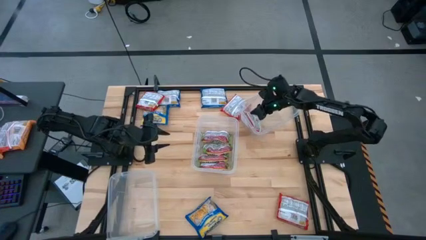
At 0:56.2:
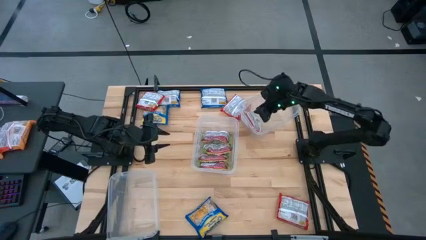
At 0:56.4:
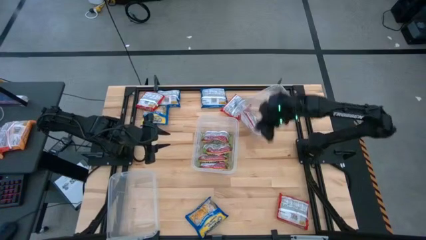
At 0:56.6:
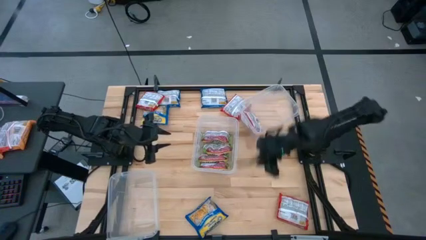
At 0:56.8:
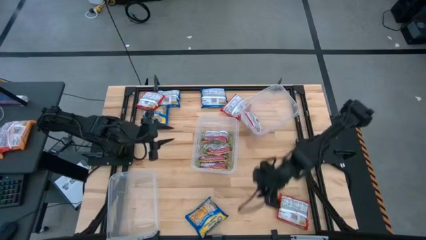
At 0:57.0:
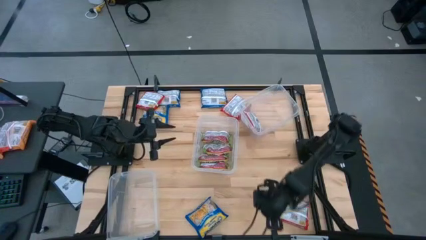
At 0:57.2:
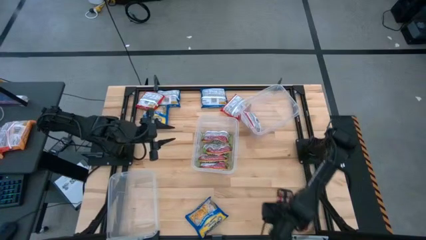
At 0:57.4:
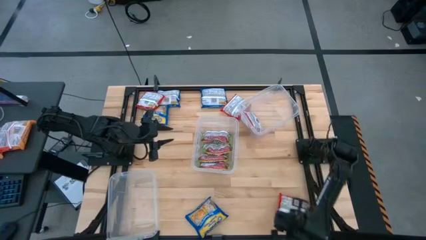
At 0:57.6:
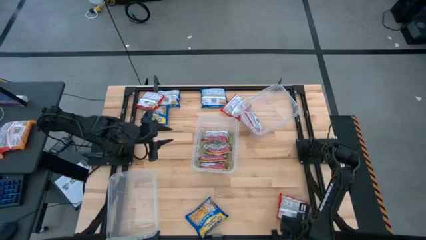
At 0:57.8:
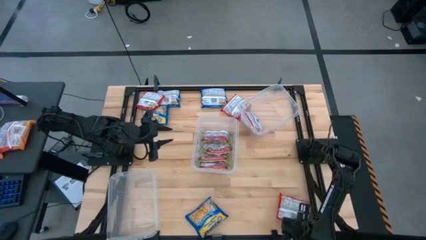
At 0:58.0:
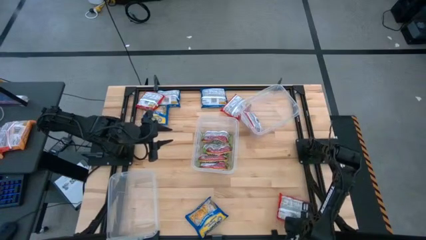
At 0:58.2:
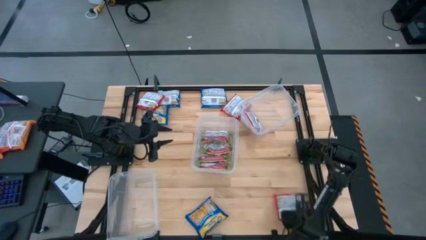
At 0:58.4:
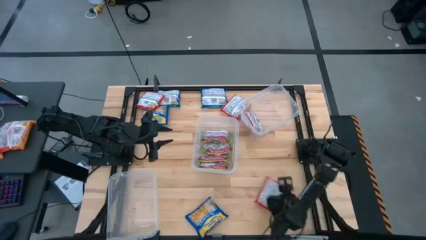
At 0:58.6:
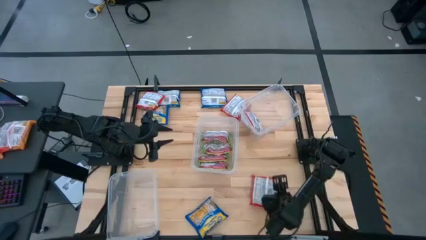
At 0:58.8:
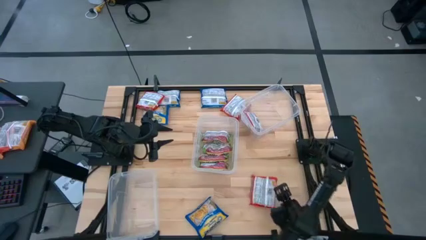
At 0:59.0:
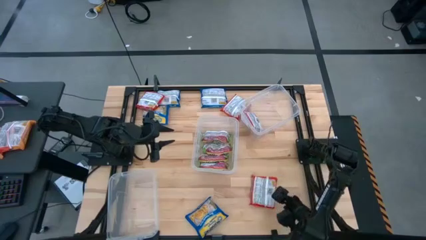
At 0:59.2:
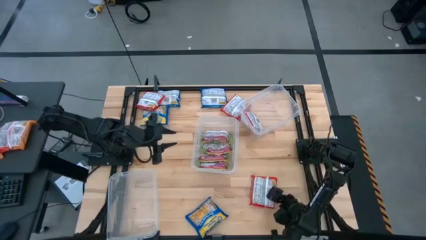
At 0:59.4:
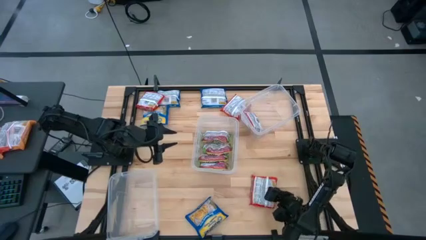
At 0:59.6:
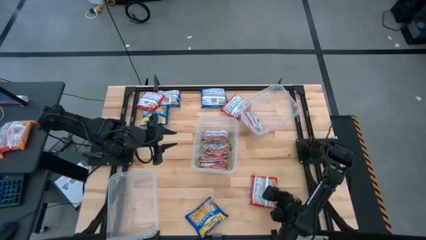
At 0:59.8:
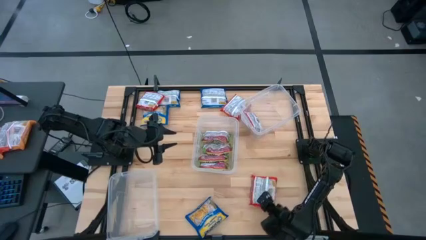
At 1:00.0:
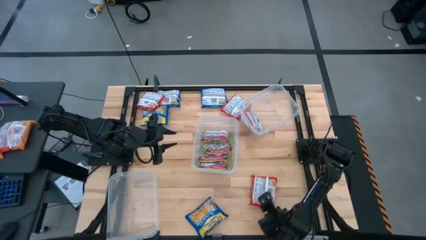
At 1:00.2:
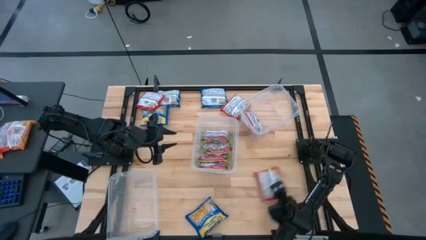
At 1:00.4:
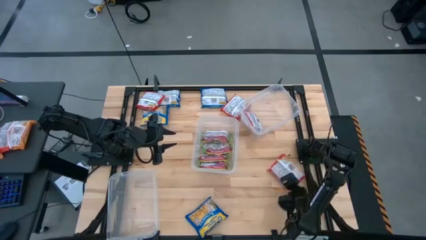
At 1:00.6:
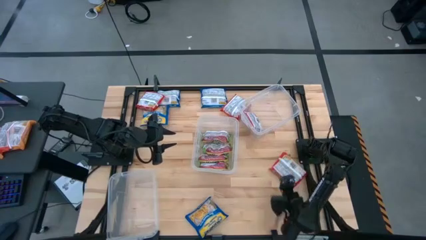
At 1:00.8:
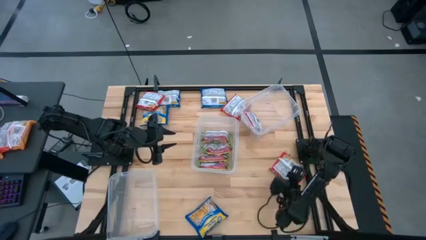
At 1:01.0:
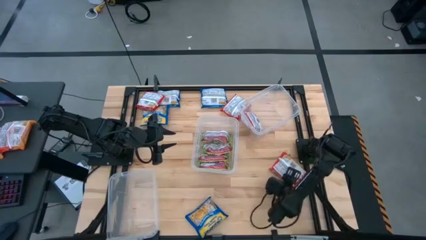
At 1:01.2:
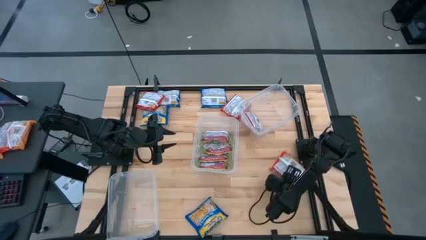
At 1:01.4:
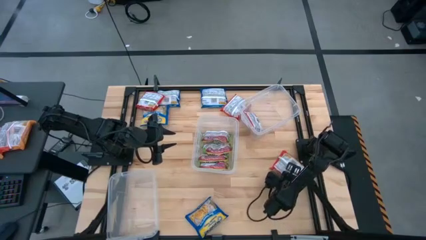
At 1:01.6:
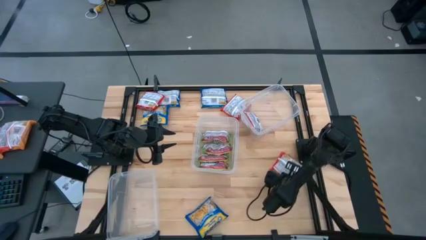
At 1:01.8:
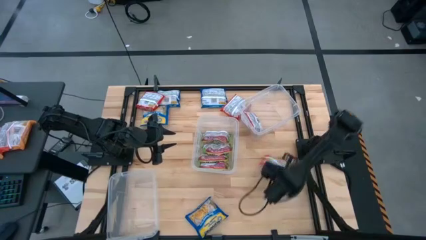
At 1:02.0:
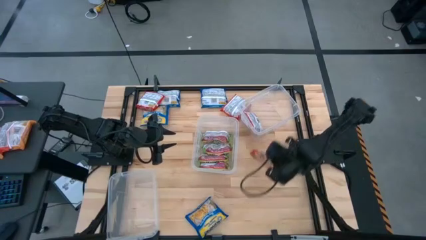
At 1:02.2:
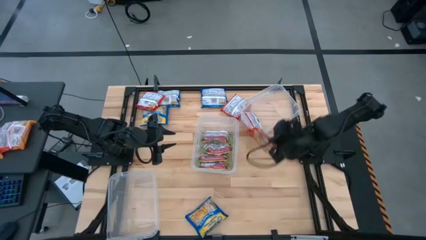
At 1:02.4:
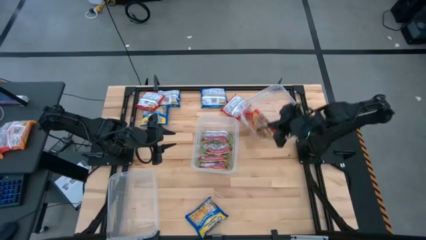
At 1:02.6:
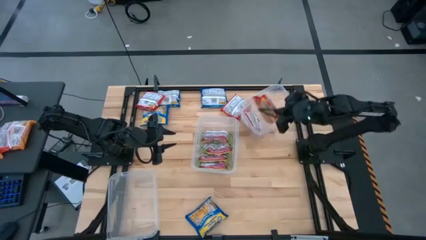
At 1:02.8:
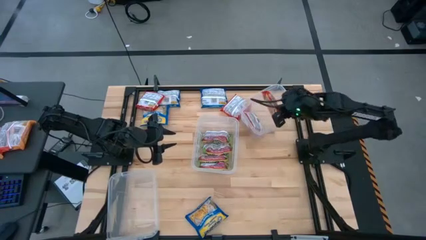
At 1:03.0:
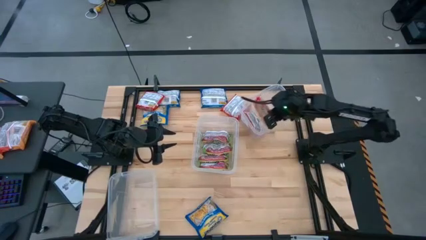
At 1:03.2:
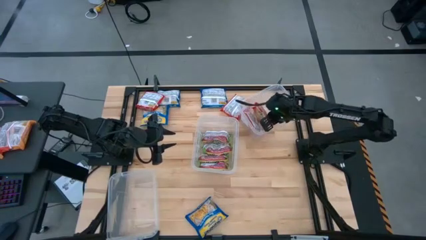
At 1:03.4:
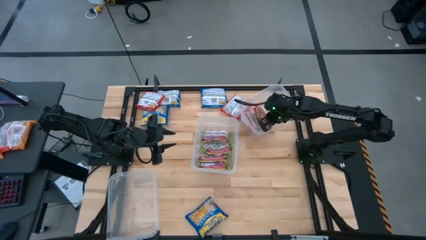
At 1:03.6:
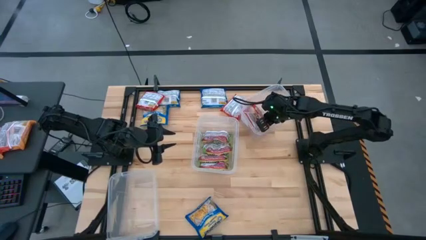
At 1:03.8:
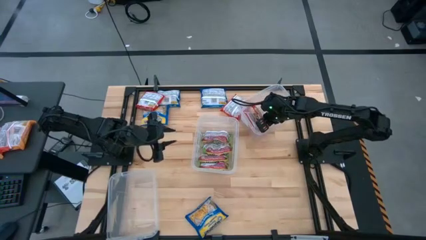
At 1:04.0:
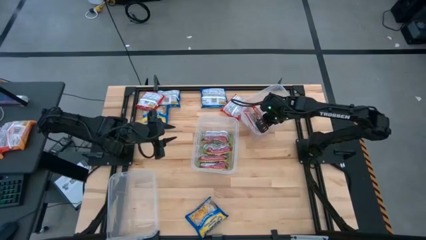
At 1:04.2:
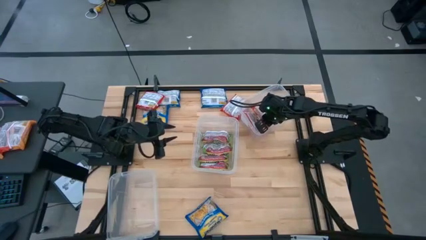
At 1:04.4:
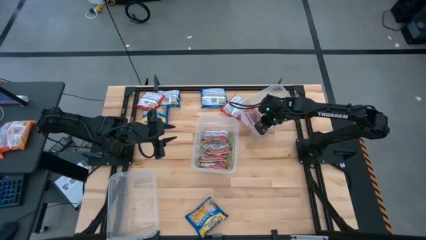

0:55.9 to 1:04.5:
Task: Sort Maruchan noodles
Put the red noodle pack into the top transparent container

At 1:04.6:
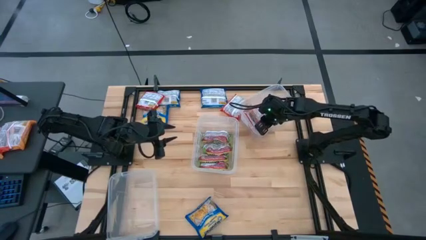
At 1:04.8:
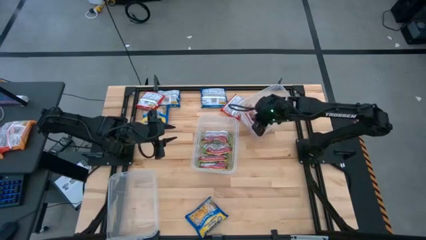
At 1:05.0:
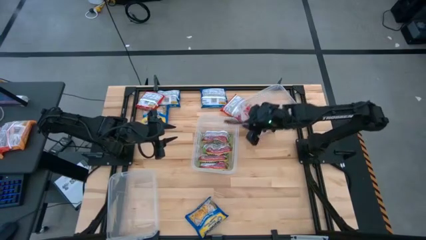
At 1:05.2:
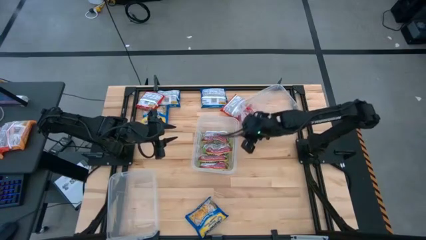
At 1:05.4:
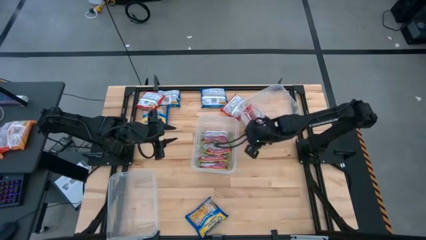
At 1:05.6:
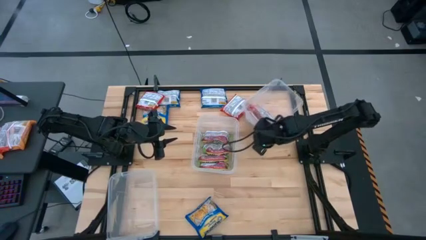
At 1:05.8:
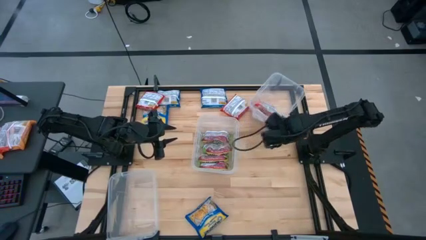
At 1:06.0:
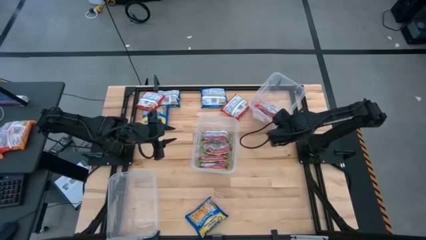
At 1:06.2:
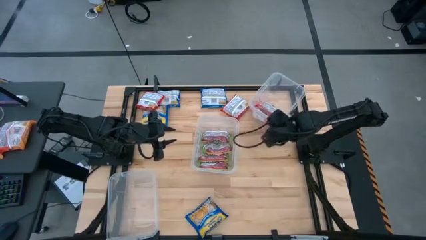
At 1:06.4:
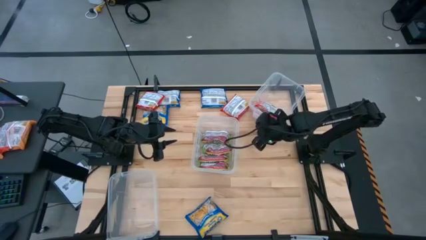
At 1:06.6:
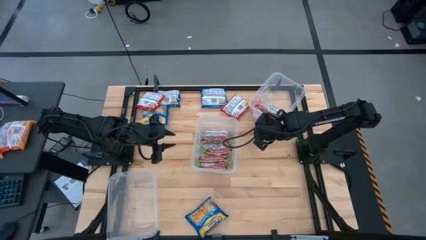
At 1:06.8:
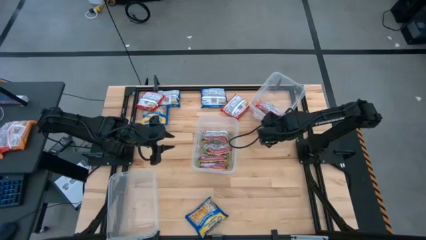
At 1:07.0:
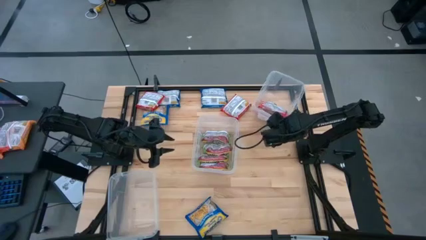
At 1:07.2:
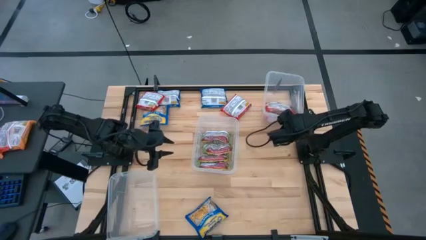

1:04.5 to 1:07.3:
Adjust the top transparent container

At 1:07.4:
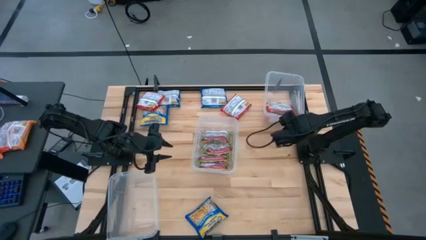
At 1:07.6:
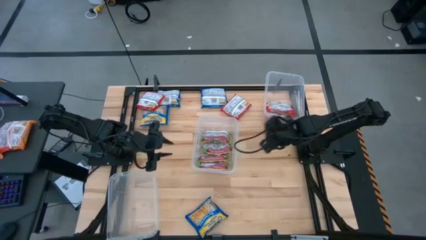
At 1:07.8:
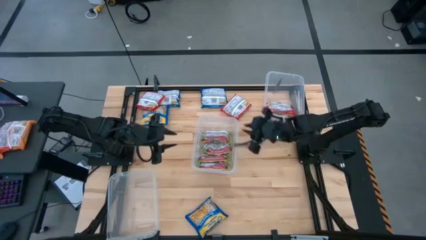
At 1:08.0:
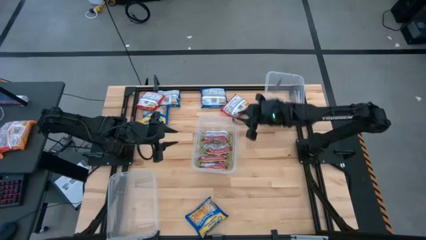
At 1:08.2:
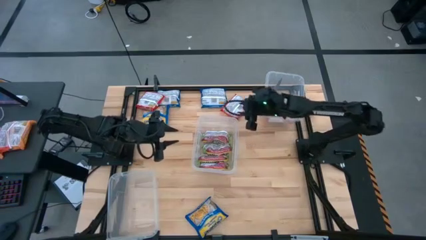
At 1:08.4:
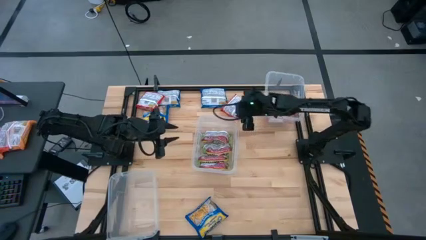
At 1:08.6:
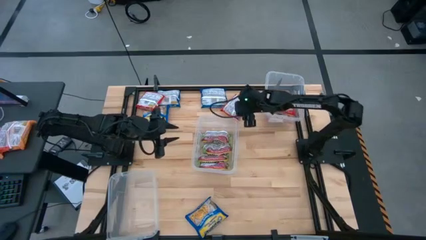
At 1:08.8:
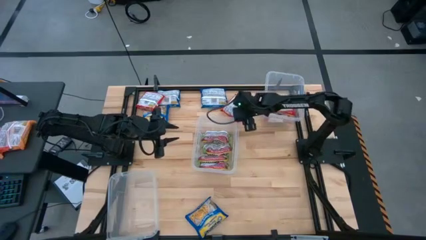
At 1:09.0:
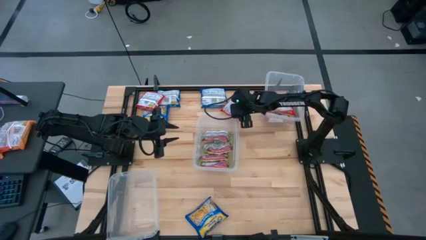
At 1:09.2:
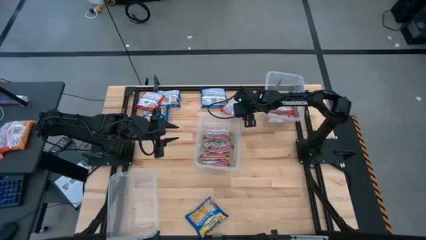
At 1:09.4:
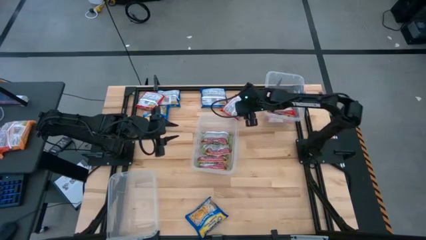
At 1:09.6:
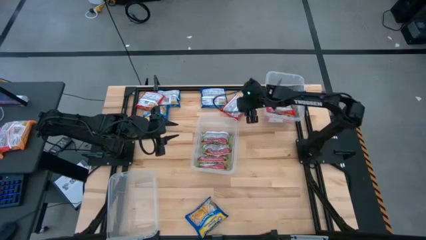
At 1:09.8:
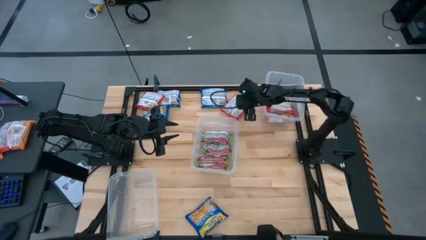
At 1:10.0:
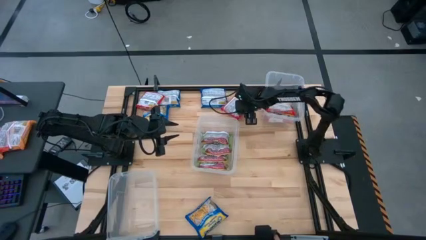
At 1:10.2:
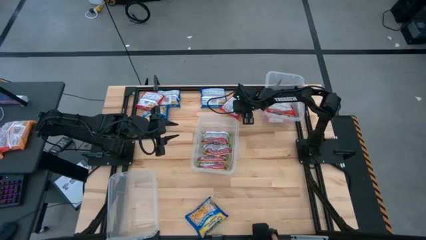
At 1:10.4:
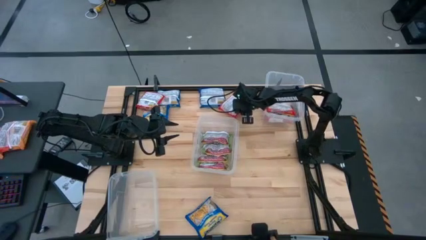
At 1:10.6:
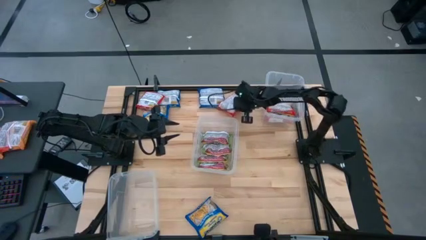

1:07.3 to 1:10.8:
Put the red noodle pack into the top transparent container
